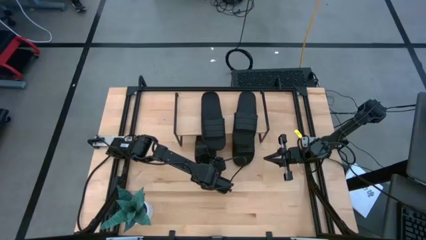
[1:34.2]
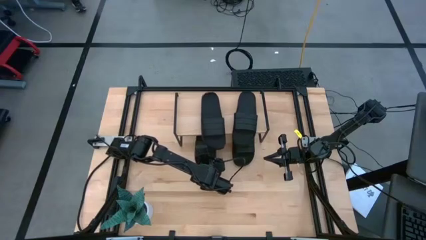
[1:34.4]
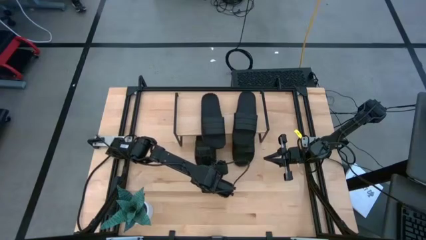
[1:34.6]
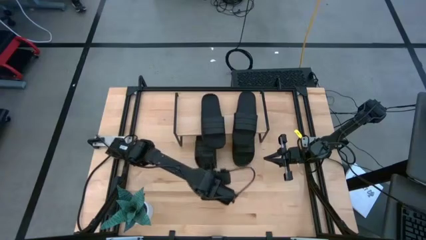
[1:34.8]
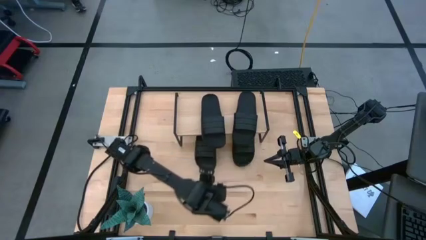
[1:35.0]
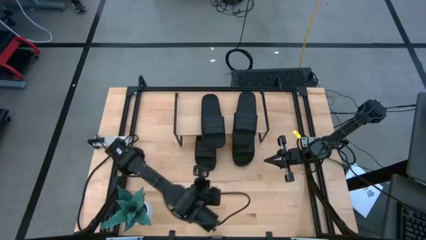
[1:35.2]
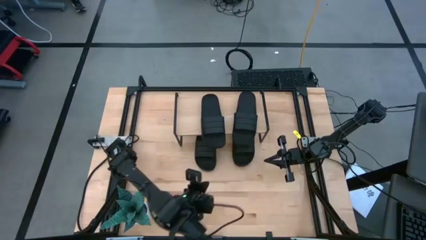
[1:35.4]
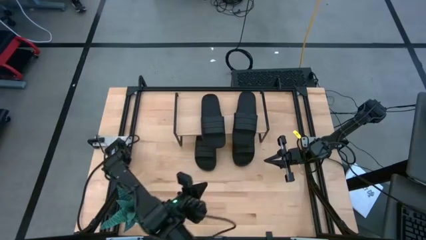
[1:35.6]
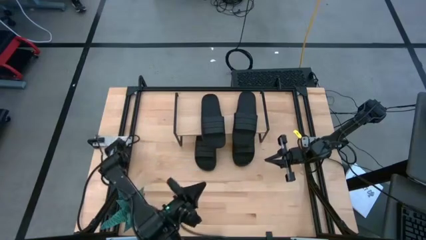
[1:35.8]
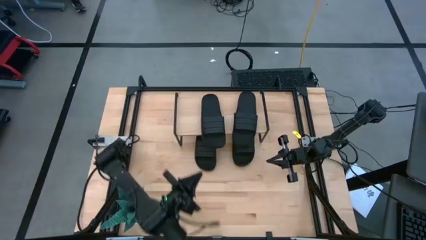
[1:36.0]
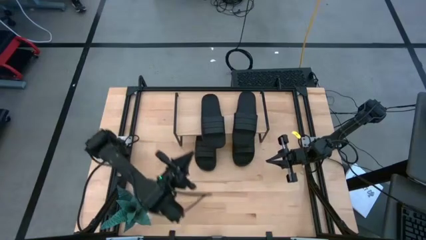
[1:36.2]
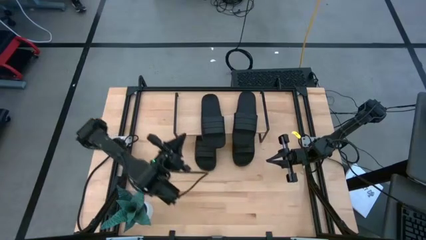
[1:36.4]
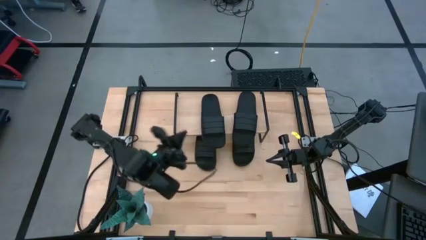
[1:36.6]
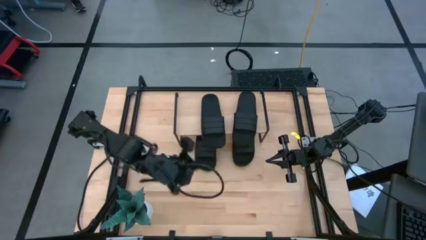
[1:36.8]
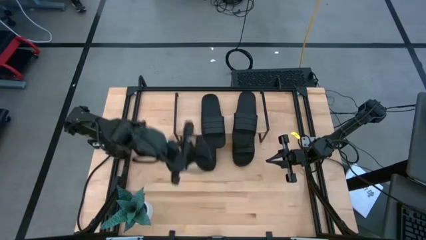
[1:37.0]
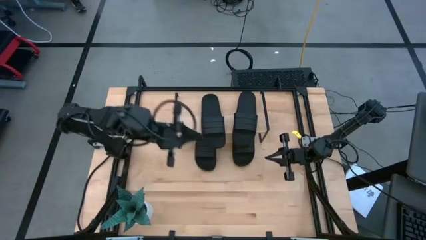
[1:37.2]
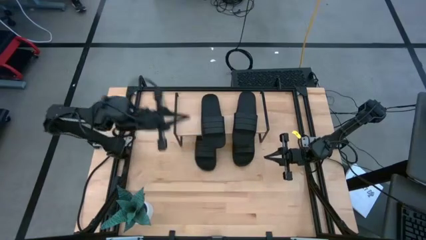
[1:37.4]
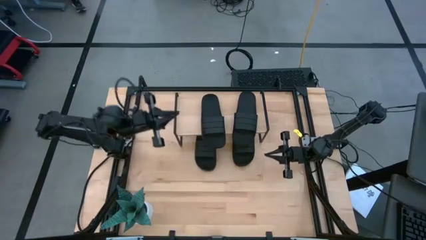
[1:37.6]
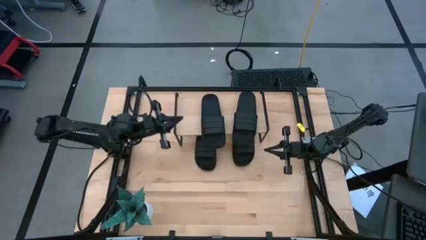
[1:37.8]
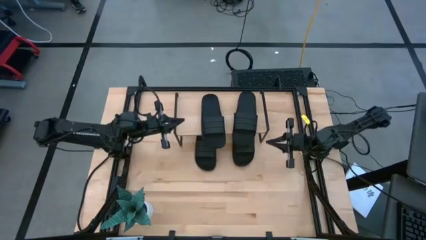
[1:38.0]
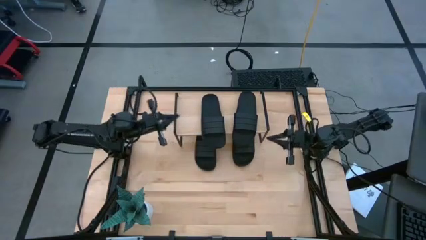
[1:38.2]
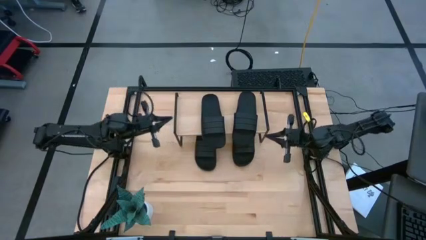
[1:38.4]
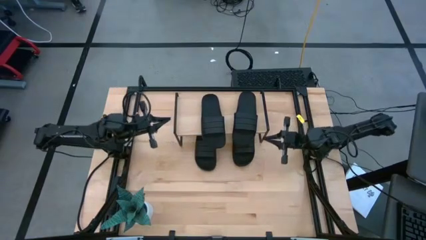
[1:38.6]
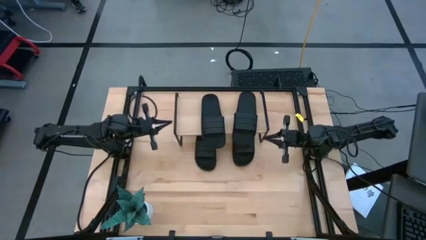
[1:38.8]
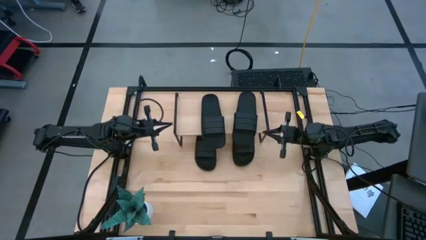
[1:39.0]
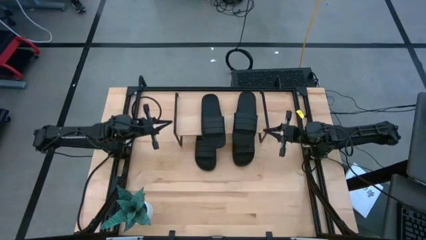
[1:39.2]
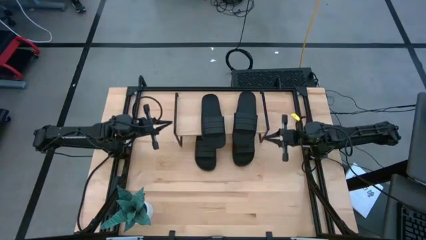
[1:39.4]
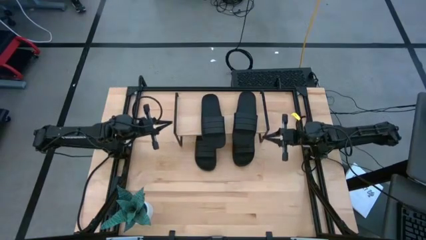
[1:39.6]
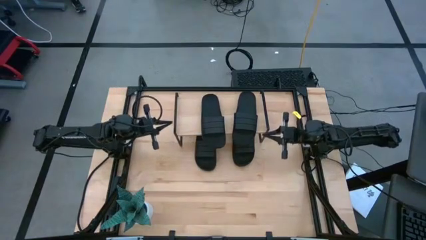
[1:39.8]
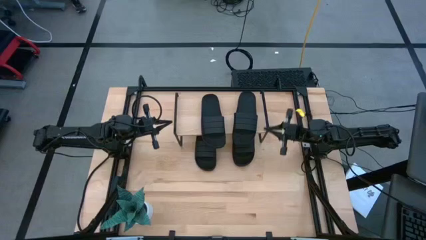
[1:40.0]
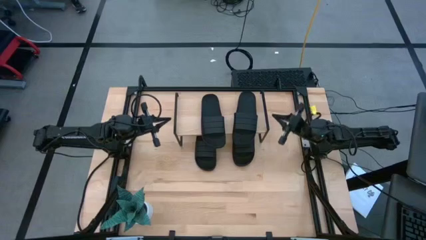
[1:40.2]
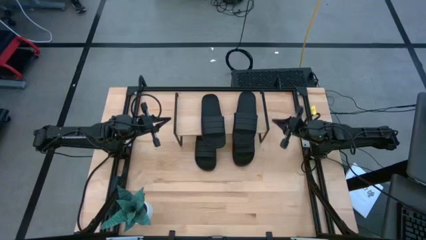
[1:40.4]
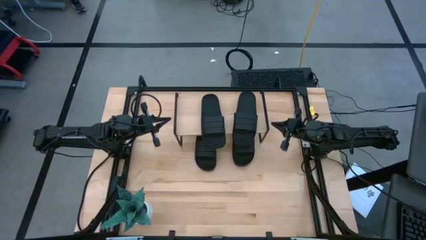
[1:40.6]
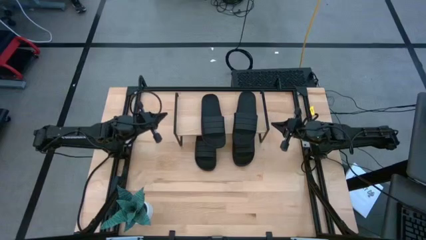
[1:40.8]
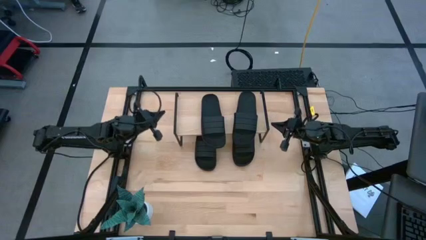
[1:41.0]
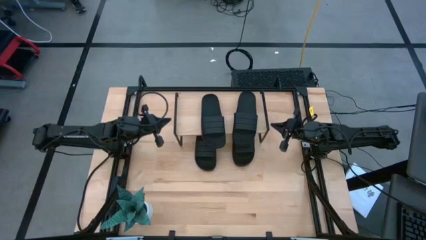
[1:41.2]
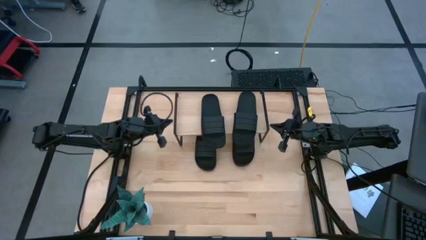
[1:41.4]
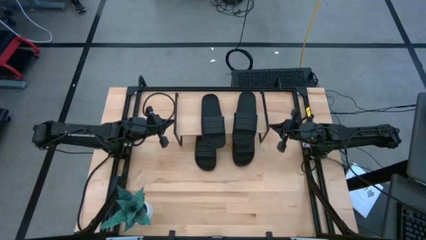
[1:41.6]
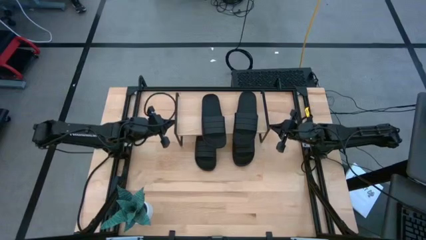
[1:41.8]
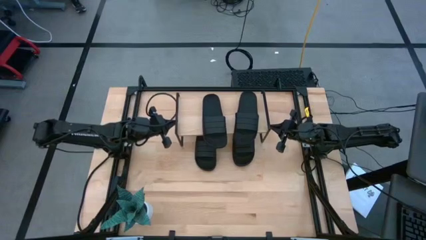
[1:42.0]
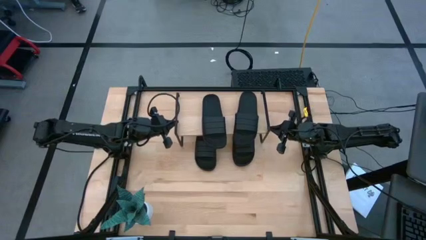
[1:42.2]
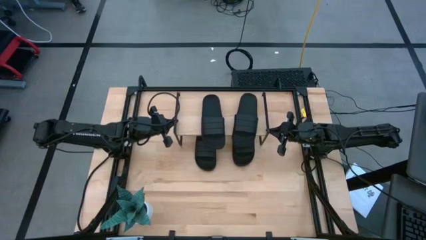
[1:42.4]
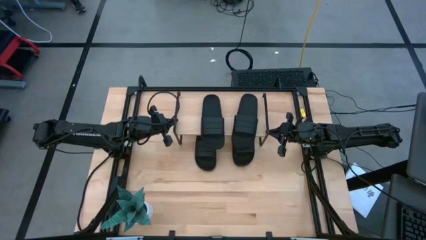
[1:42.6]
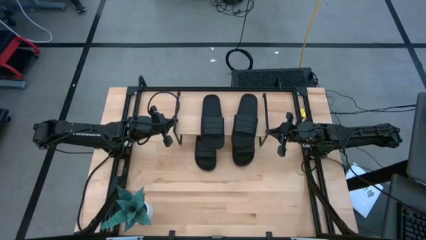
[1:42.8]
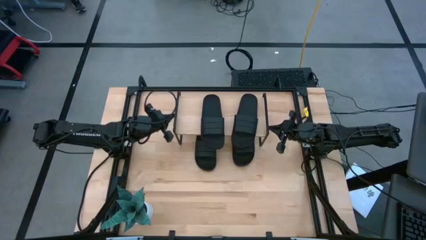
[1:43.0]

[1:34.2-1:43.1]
Task: Pick and place slides into the shelf
Adjust the shelf

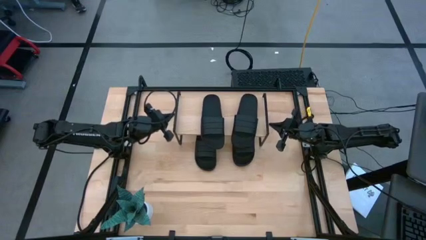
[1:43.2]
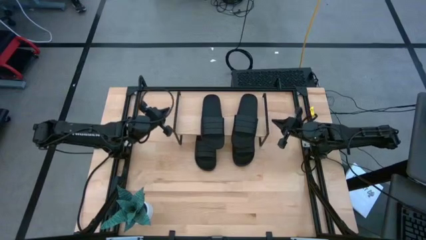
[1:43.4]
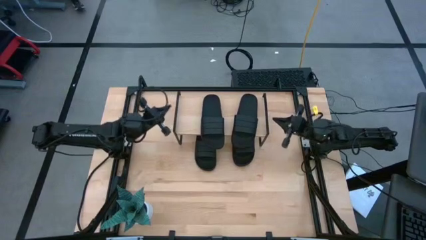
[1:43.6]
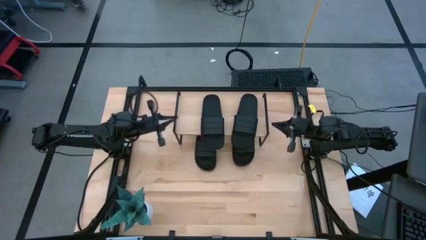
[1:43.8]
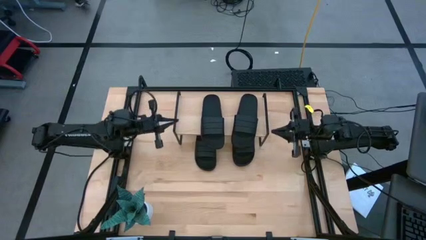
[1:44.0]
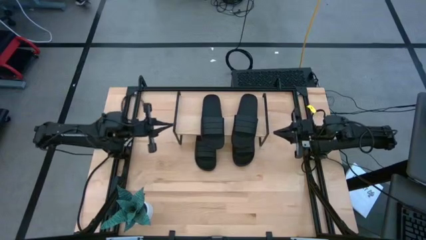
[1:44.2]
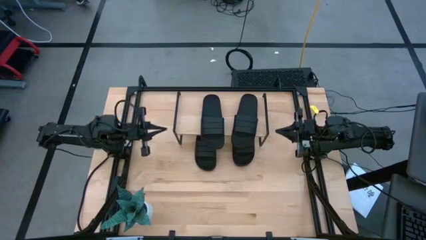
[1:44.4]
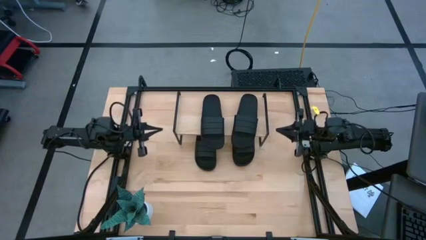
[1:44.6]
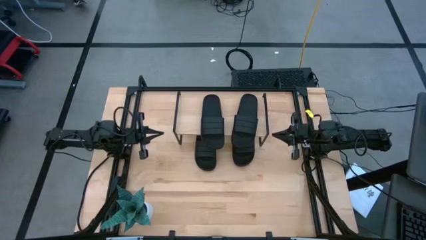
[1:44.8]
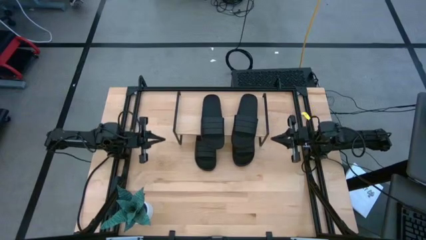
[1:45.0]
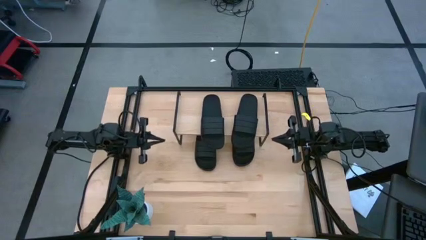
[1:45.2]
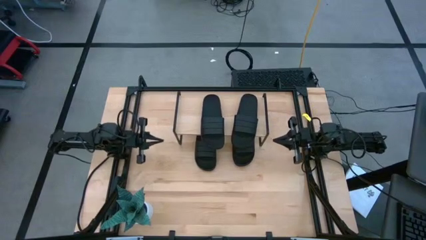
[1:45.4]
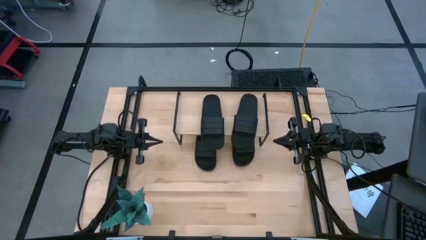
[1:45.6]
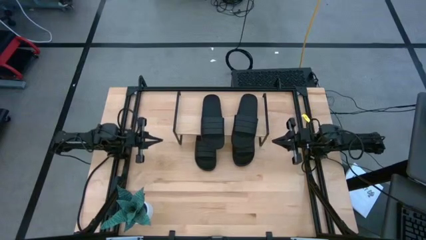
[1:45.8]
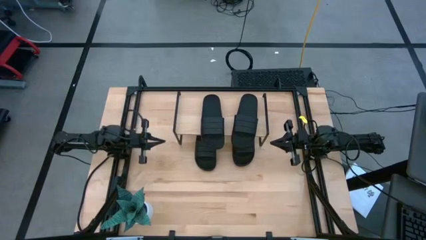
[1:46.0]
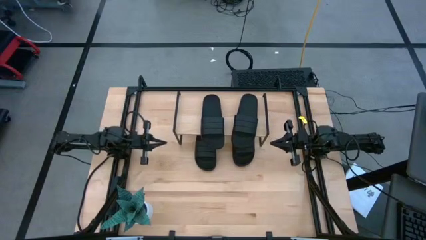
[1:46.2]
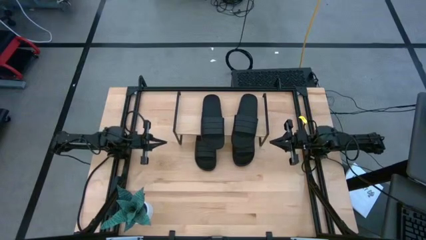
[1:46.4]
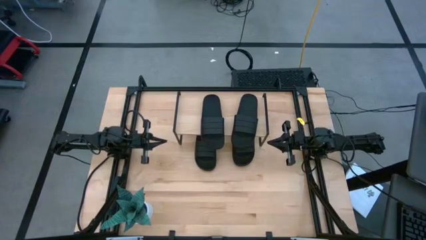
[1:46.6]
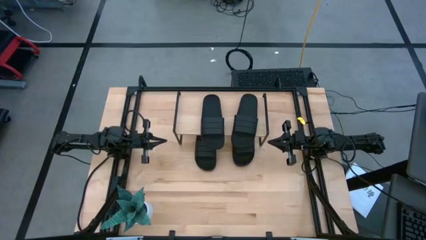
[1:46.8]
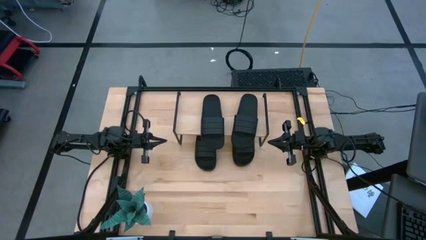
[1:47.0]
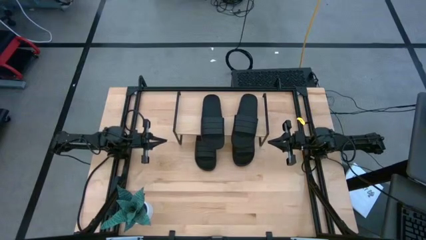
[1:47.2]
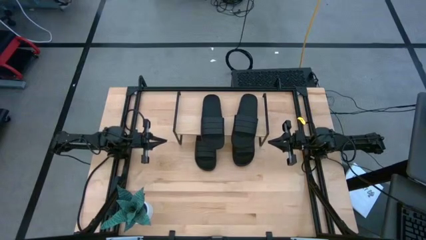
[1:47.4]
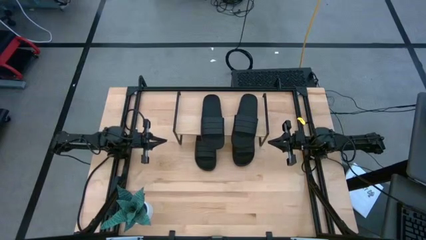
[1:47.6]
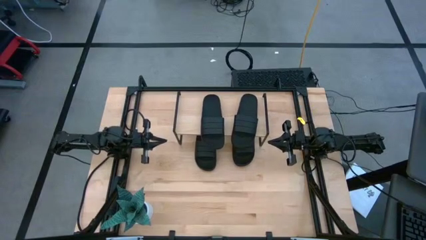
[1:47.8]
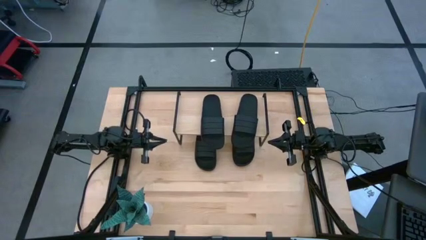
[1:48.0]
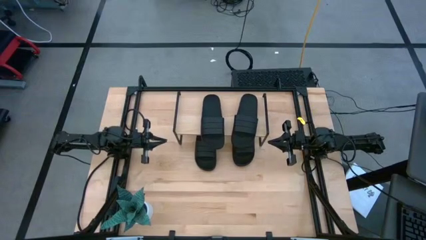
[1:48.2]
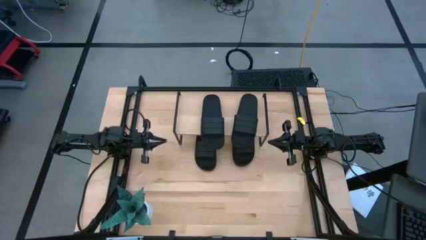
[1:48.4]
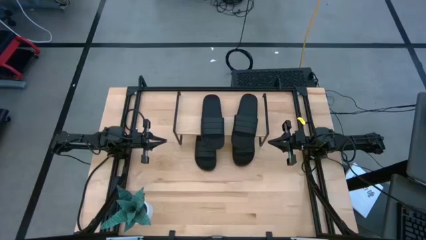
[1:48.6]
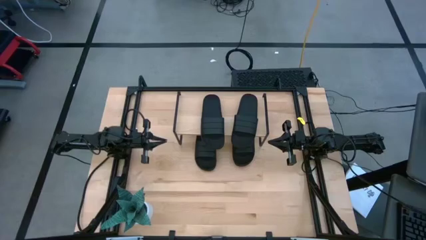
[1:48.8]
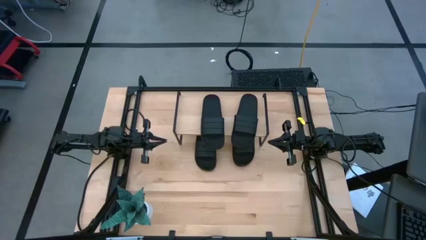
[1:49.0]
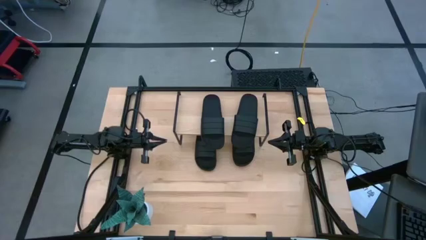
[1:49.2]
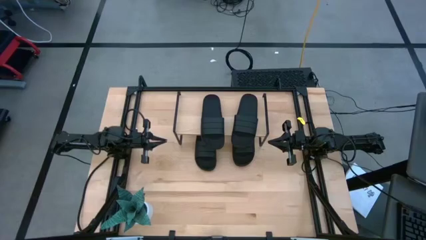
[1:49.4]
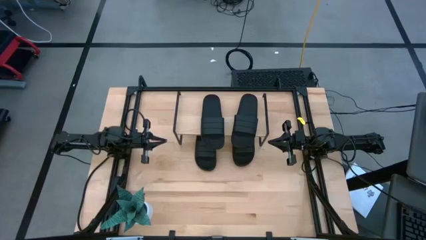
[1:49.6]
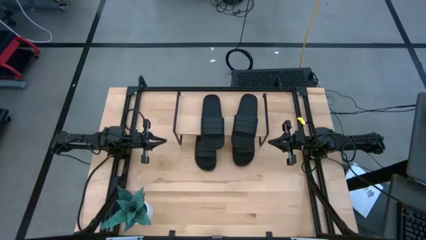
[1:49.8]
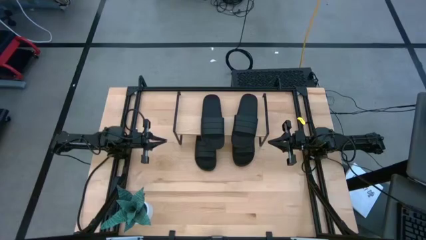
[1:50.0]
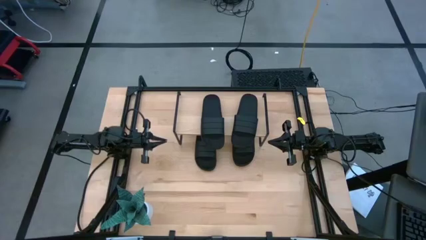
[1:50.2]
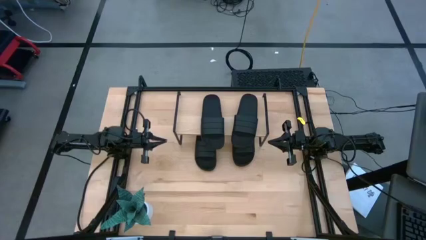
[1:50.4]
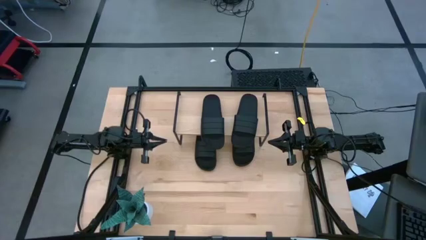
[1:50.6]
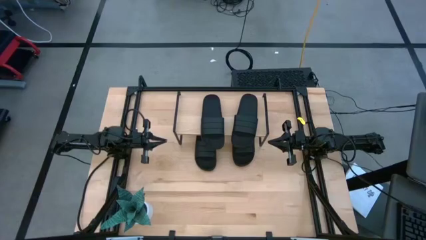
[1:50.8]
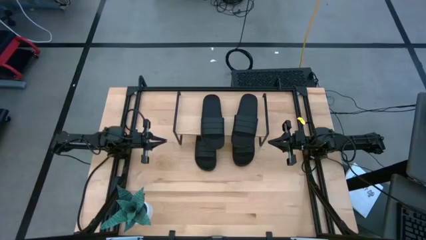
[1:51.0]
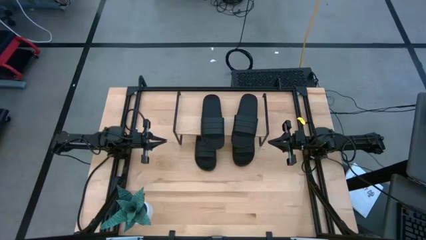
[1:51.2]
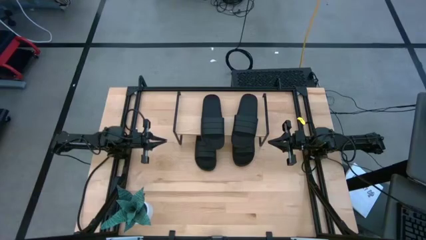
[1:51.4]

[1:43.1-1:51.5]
Return to Home Position
